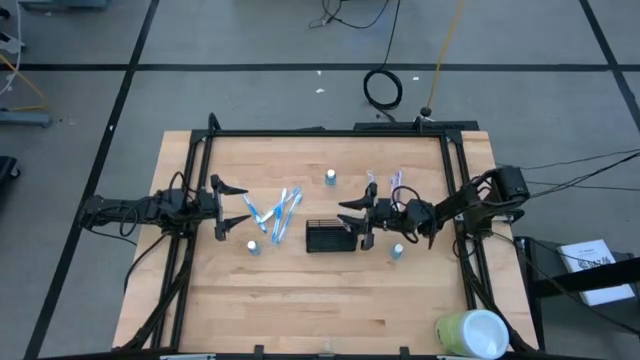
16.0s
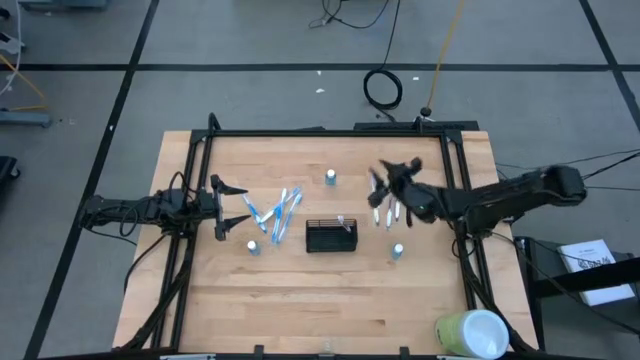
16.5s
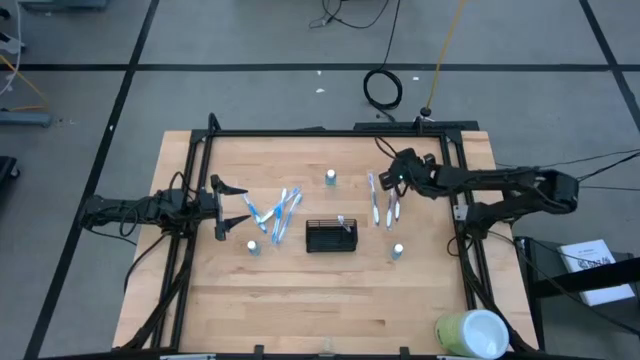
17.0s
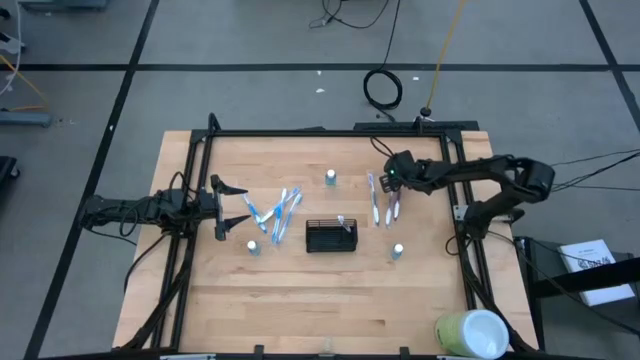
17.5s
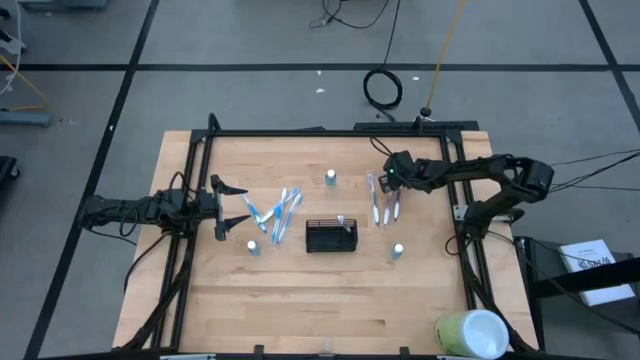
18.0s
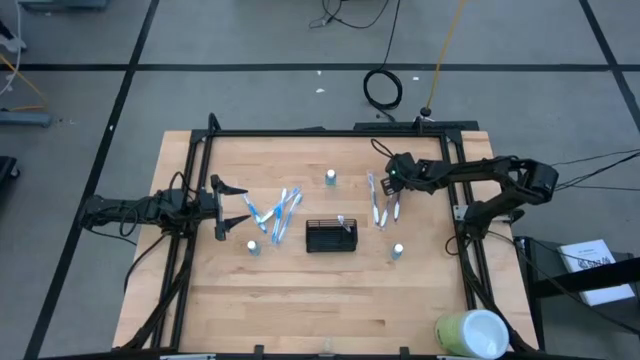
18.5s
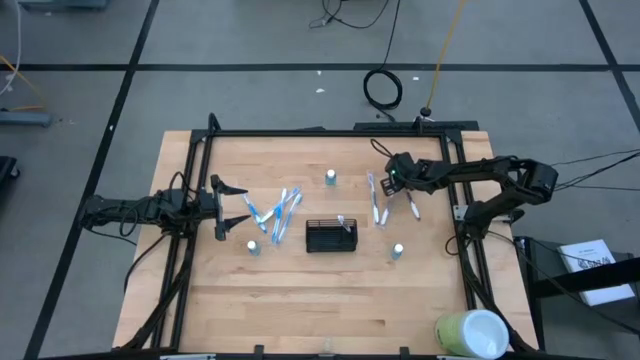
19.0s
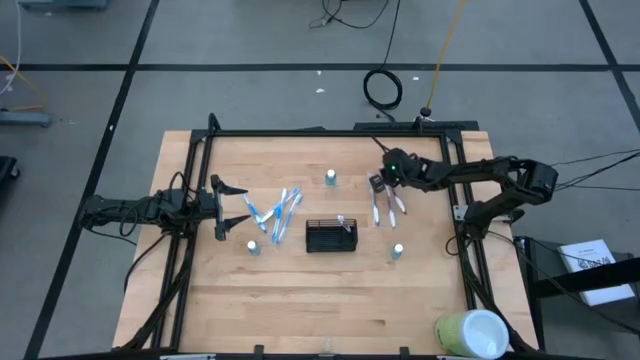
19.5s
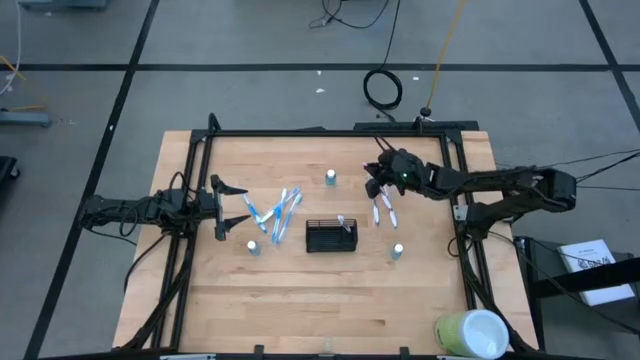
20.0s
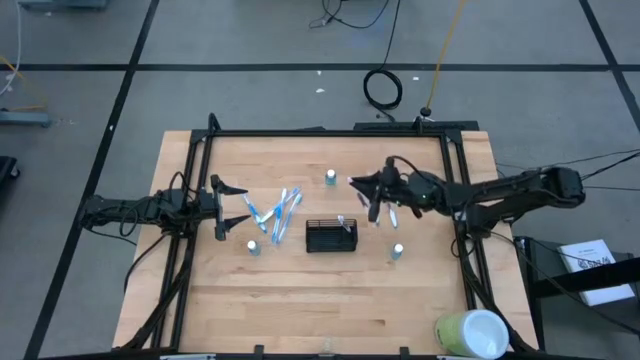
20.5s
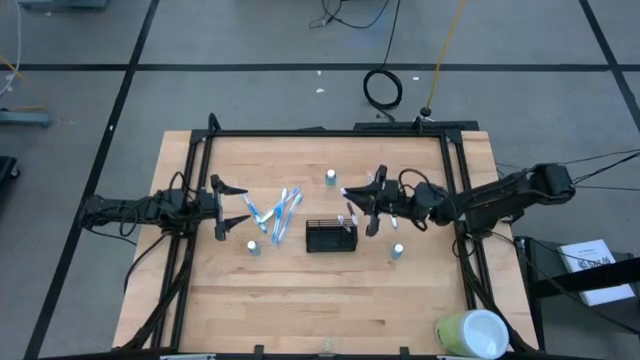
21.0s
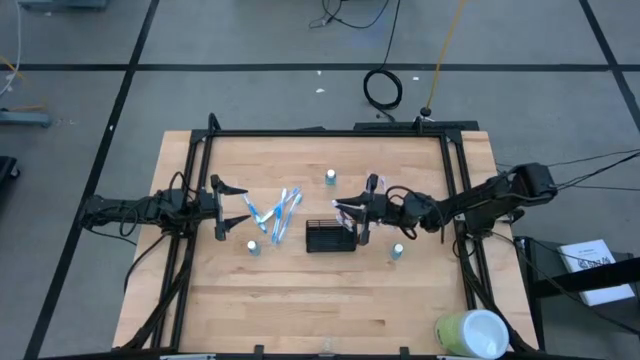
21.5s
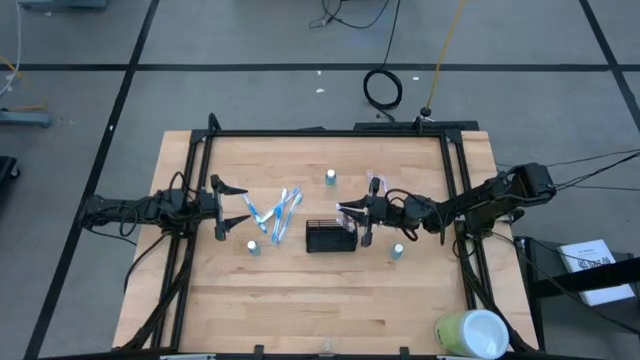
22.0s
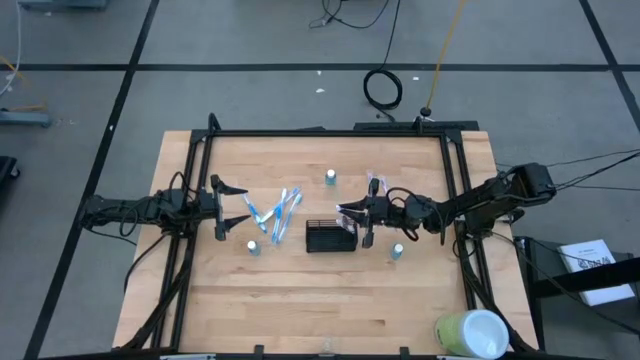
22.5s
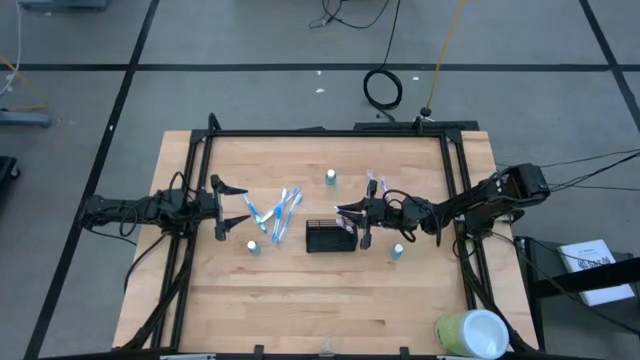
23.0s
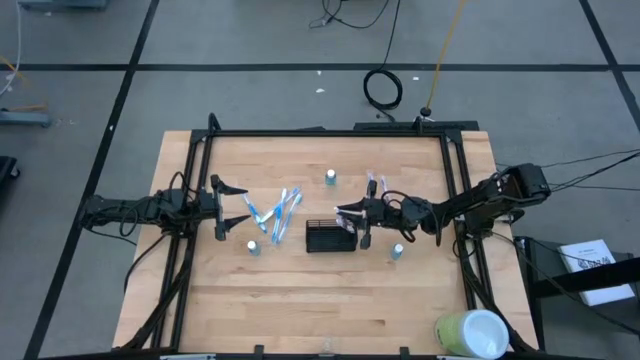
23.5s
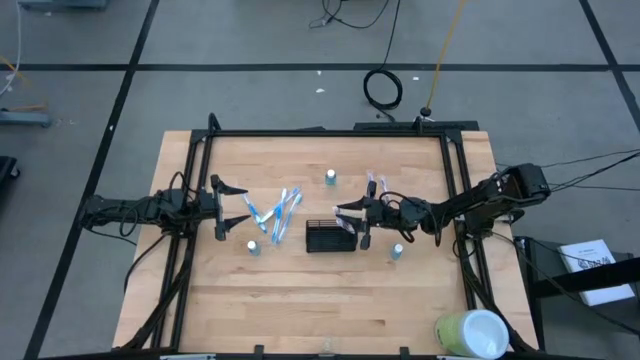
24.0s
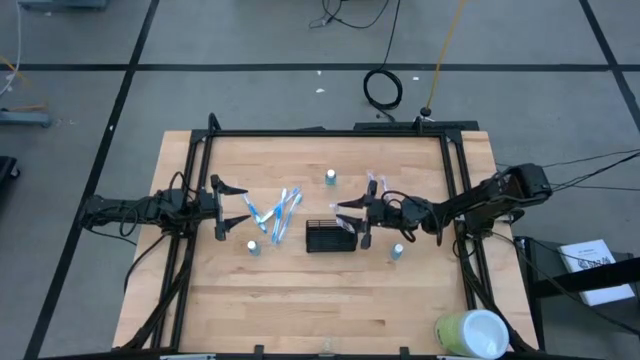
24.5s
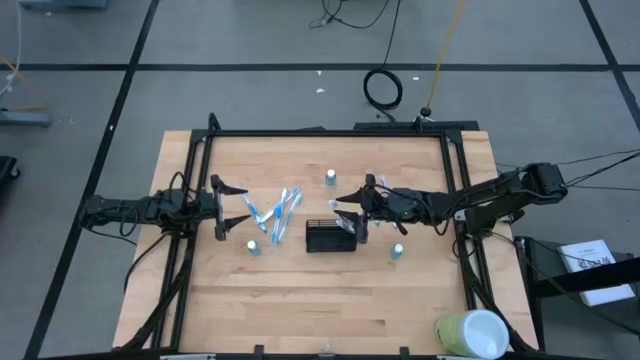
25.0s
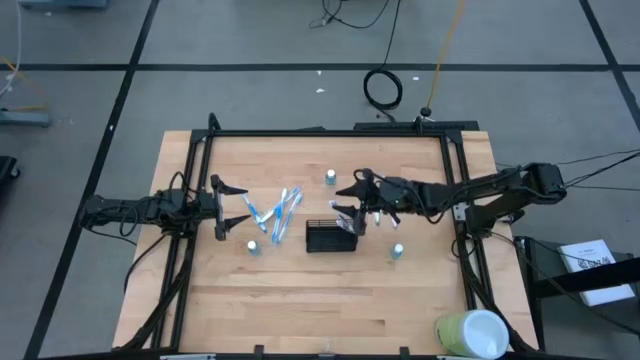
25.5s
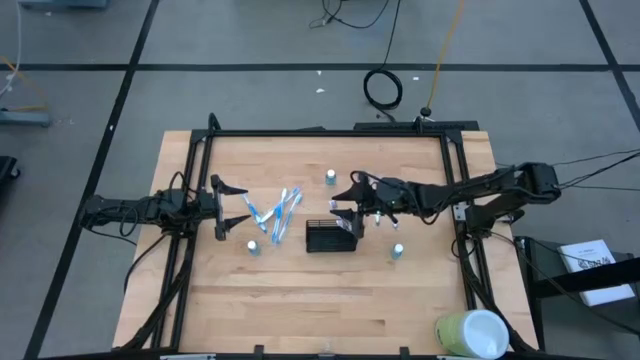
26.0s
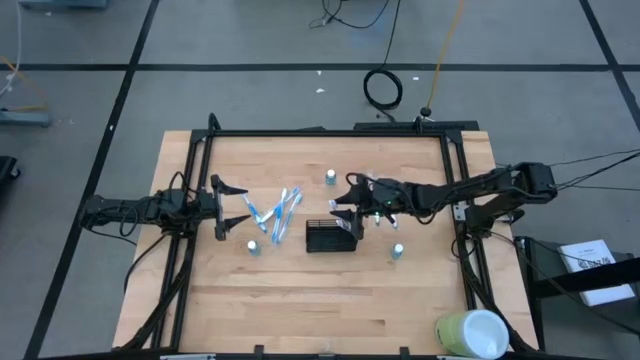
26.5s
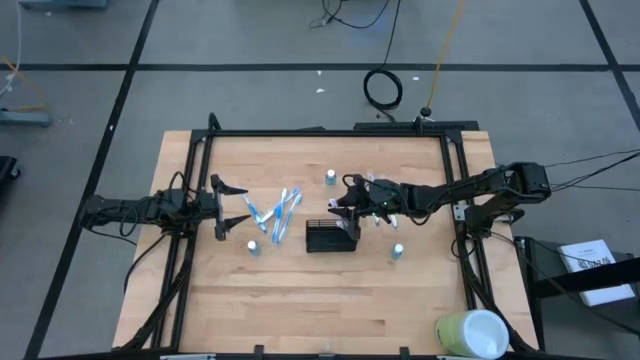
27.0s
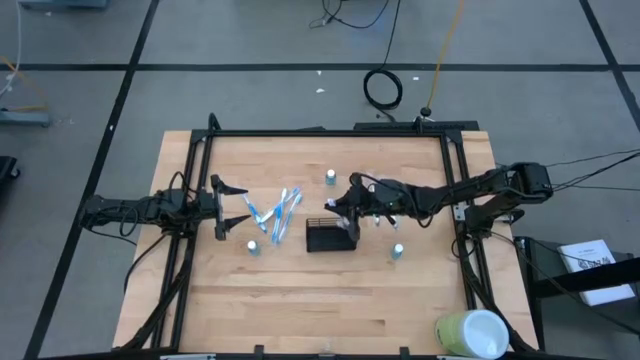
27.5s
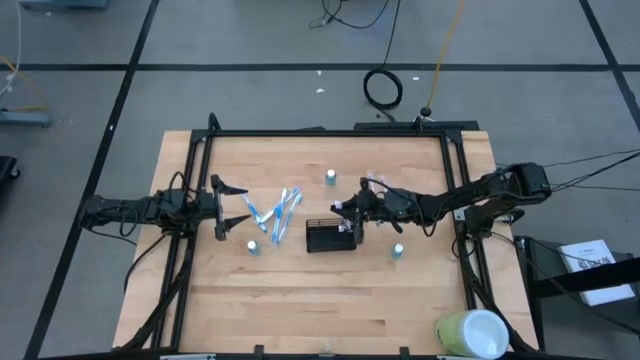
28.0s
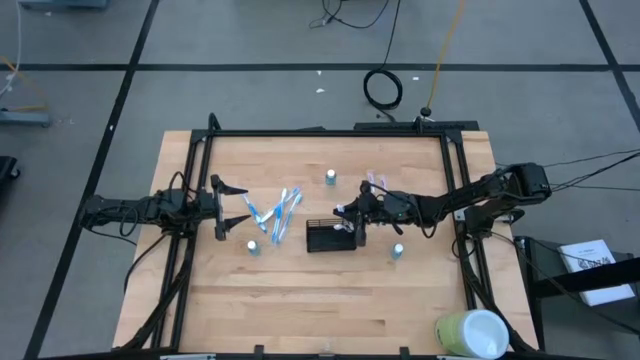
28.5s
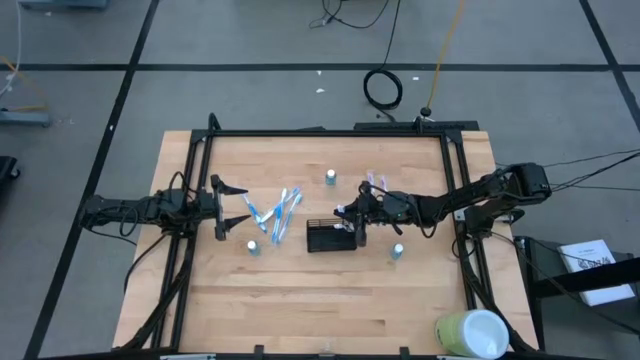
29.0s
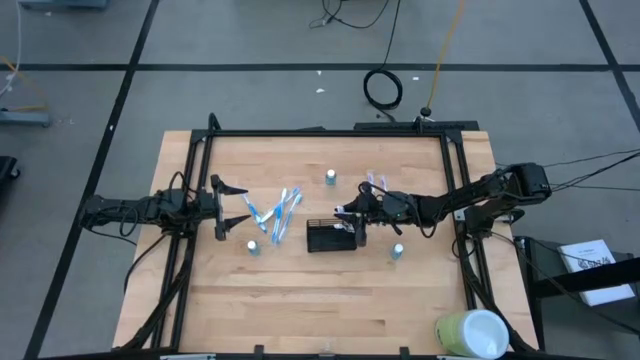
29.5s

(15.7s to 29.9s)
Task: Pick & Place toothbrushing station
Put the purple toothbrush into the right section of the wire organizer

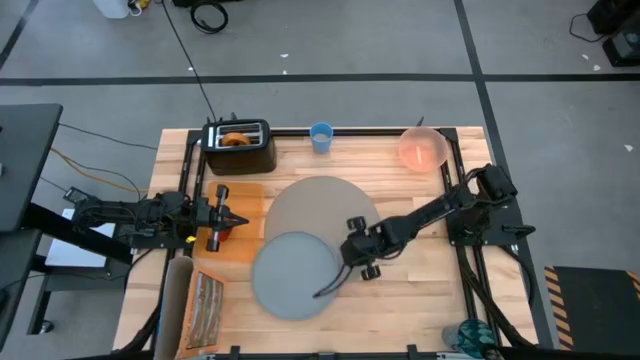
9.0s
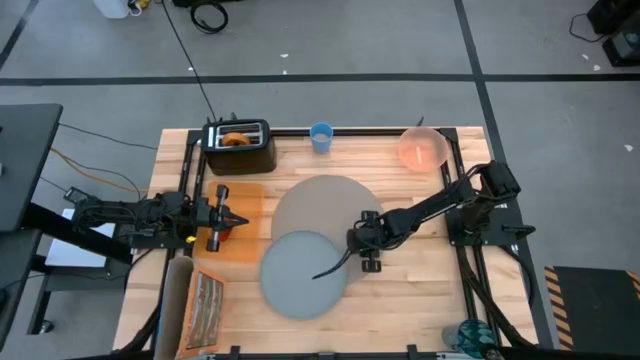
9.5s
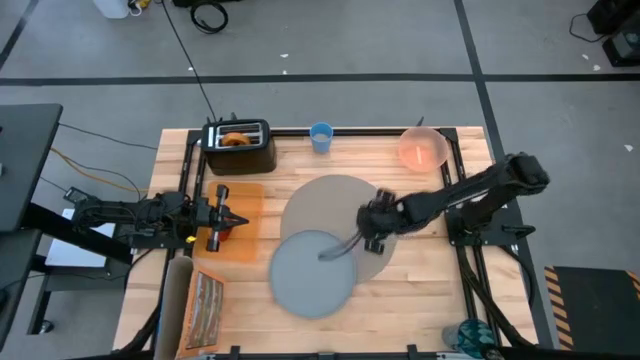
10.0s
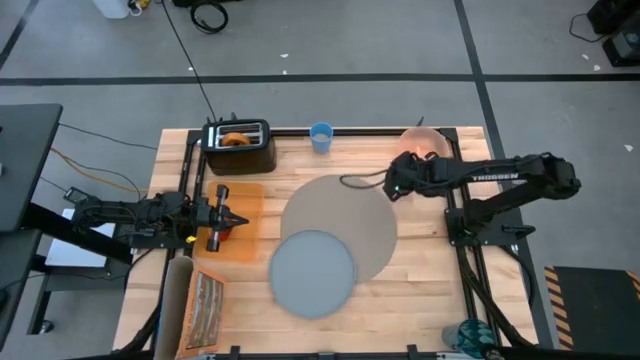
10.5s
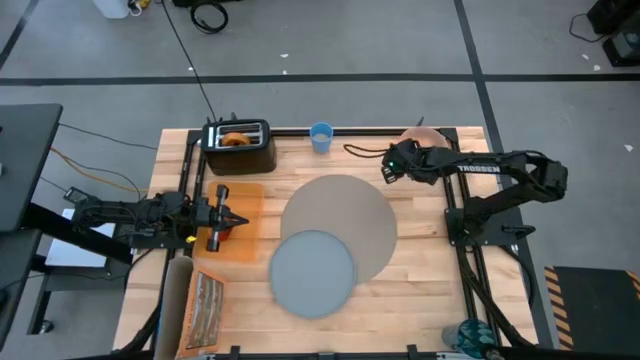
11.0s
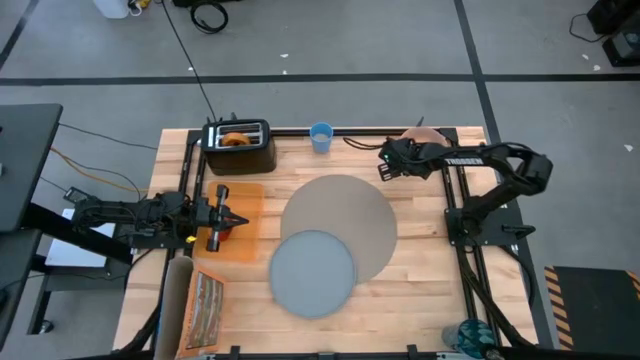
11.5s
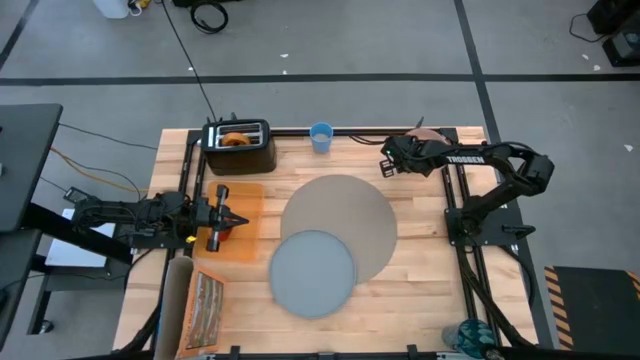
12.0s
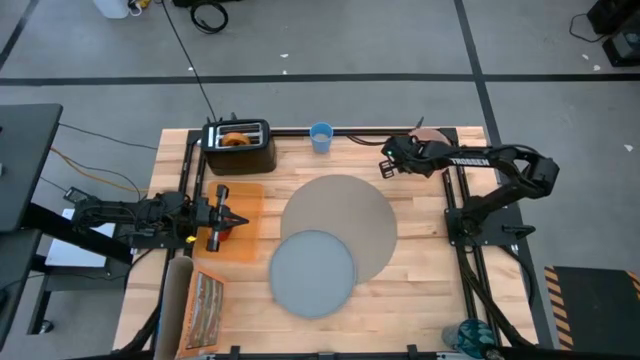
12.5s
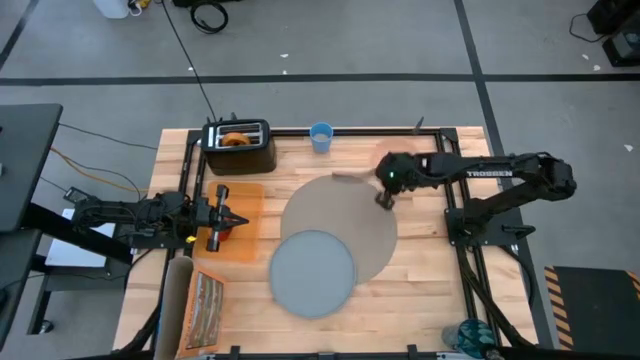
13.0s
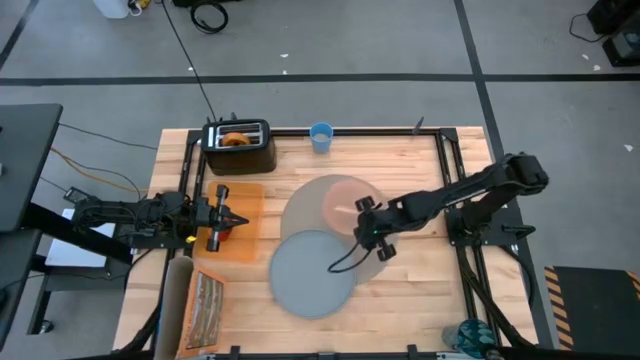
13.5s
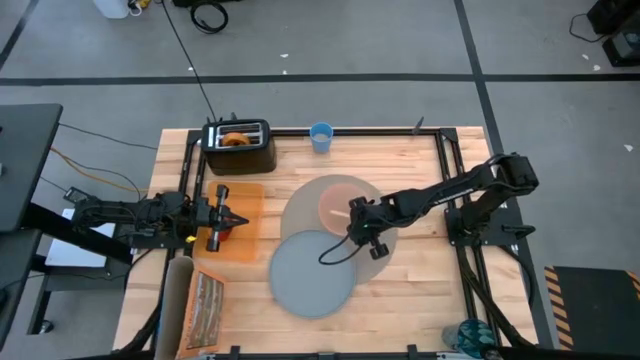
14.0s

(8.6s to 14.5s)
Task: Arrange a breakfast setting
Put the pink bowl on the table mat
